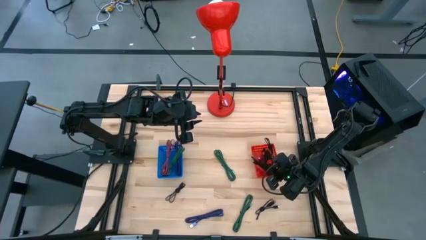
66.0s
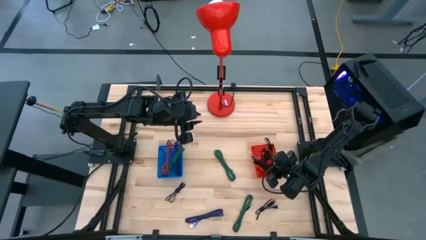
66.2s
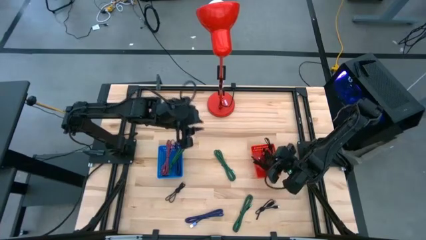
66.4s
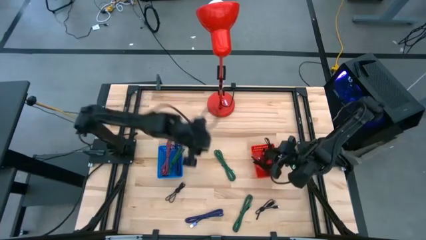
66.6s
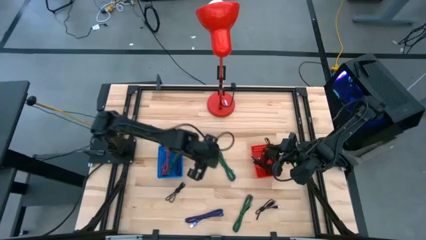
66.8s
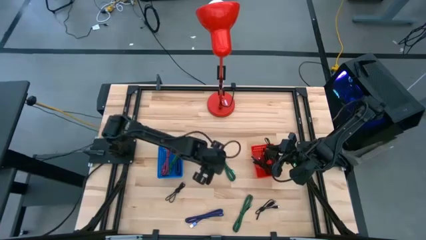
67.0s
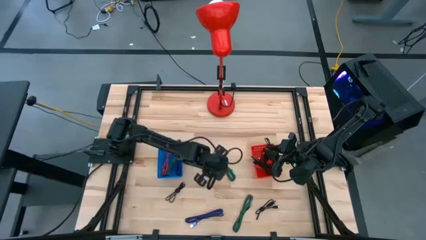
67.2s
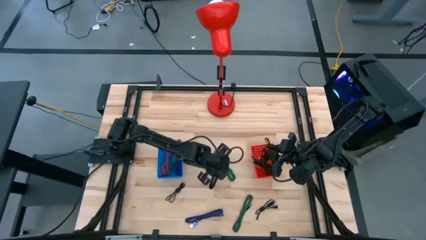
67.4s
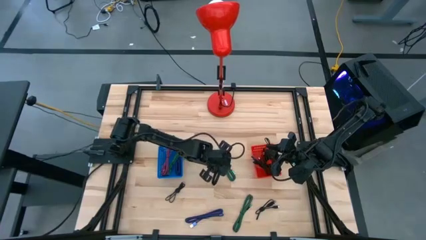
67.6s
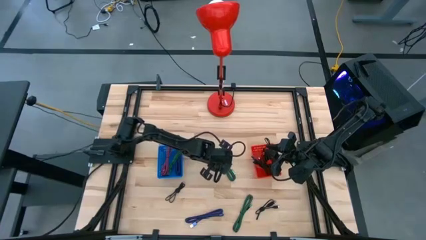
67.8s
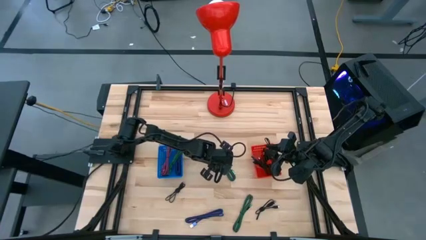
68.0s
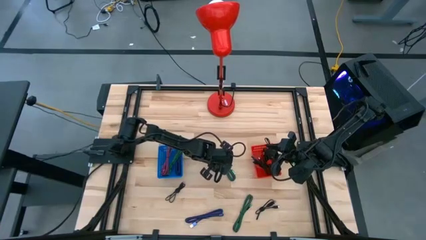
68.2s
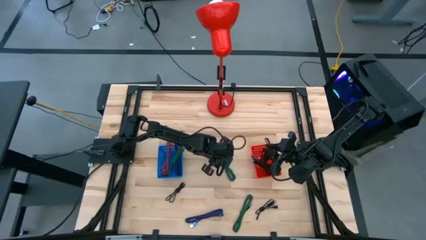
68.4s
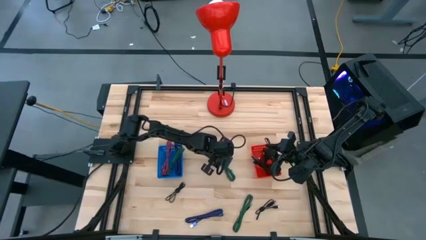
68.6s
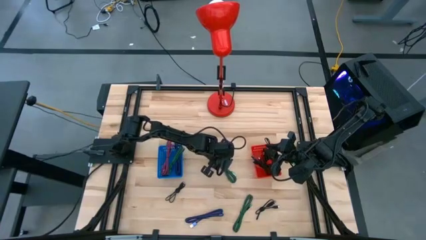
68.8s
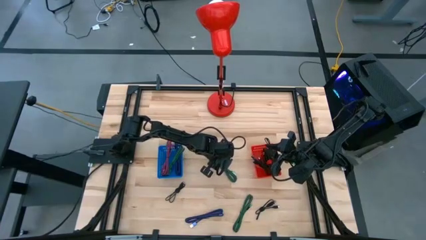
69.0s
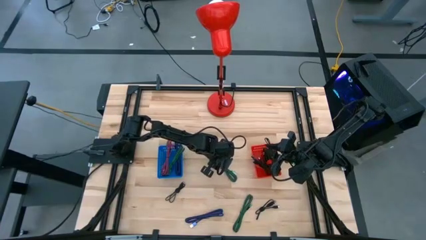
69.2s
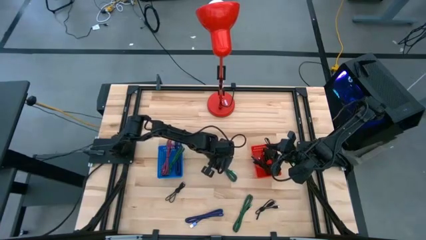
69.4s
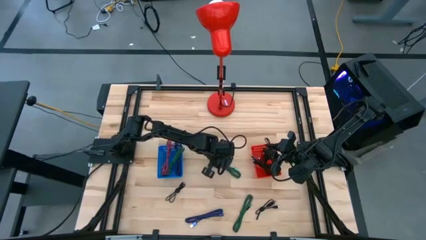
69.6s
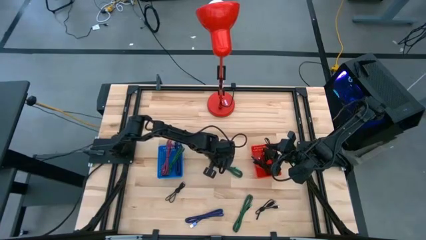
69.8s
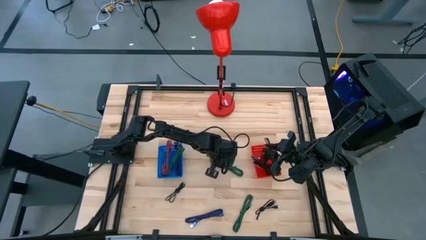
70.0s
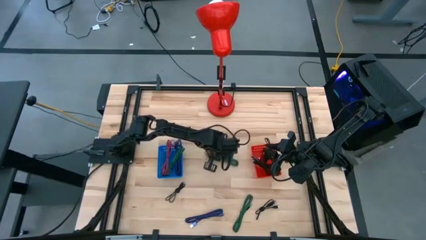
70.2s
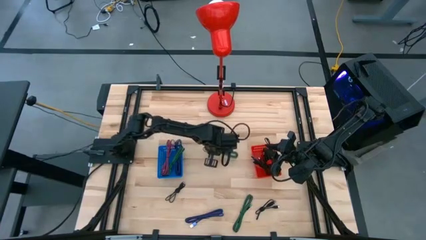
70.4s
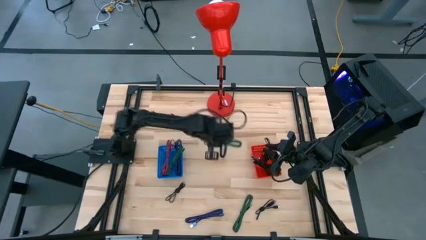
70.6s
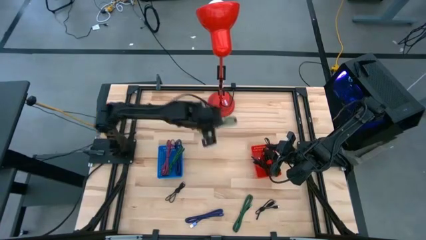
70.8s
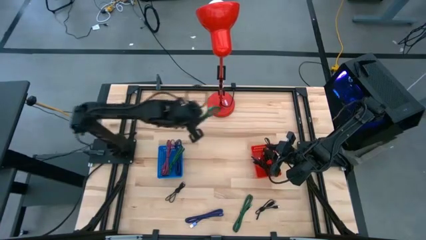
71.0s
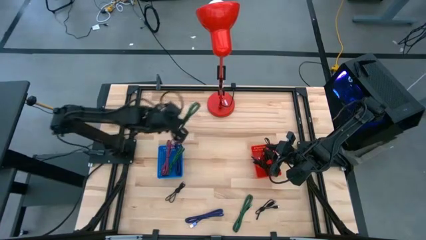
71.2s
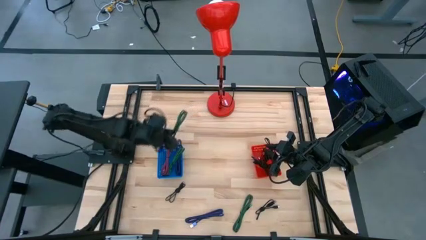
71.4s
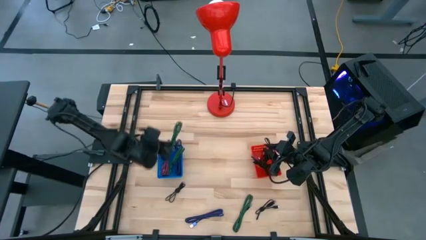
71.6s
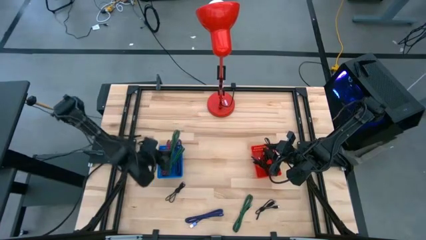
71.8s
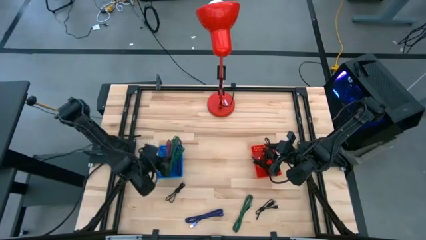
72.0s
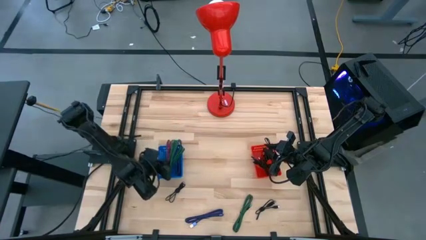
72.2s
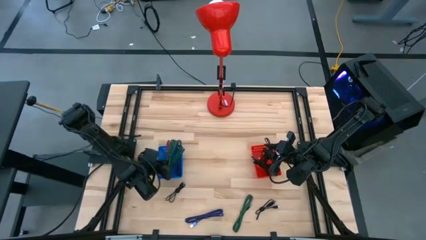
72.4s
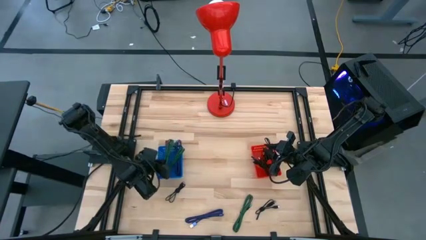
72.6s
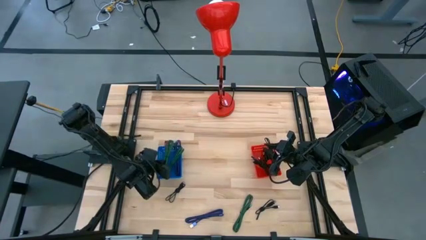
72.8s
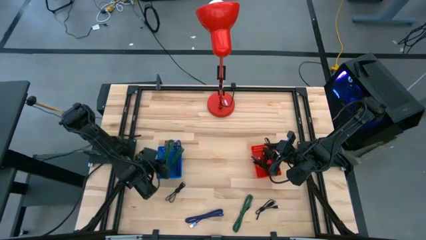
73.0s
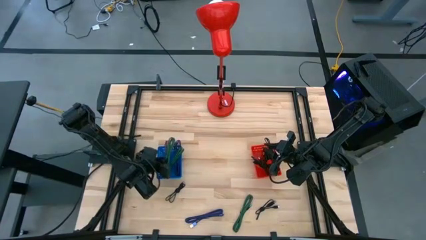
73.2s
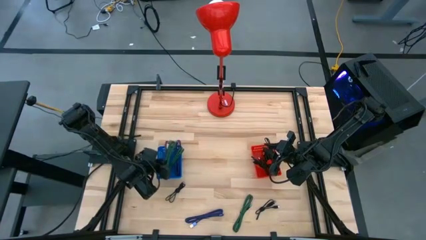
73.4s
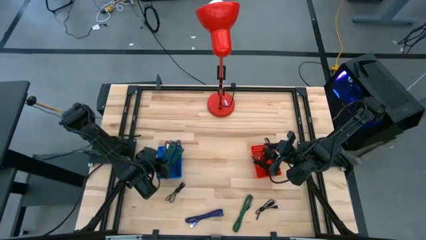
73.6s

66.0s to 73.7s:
Task: Pick & Place USB Port
Put the green and black charger cable into the blue bin

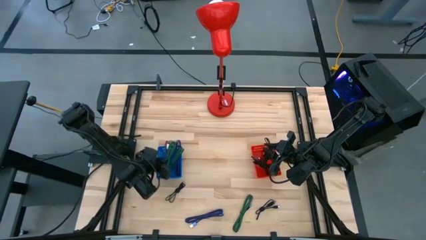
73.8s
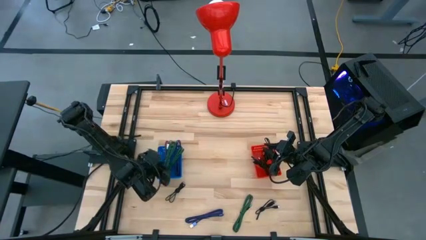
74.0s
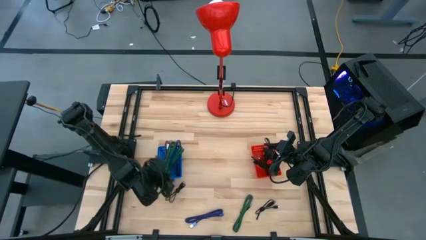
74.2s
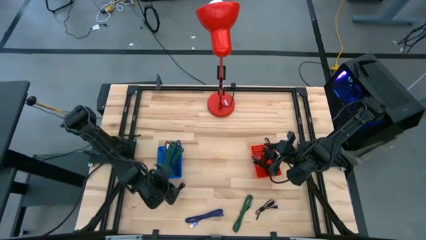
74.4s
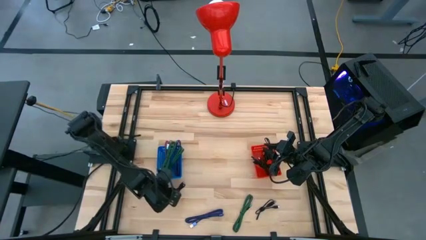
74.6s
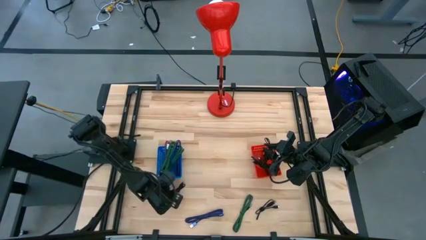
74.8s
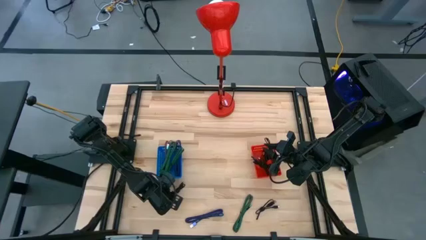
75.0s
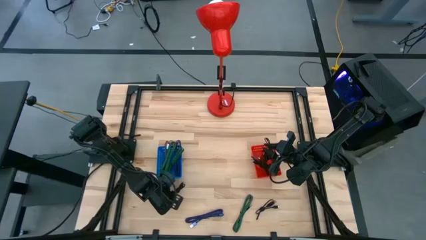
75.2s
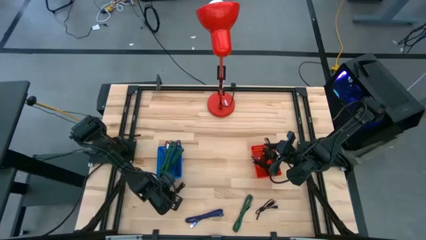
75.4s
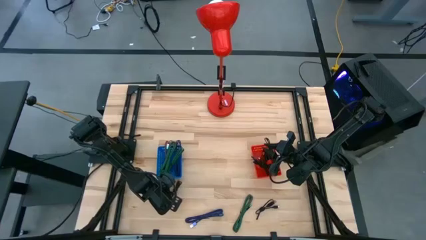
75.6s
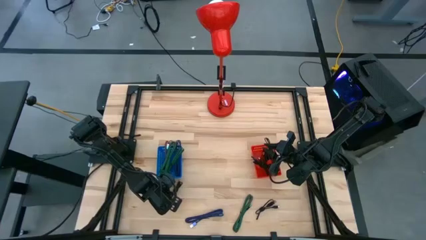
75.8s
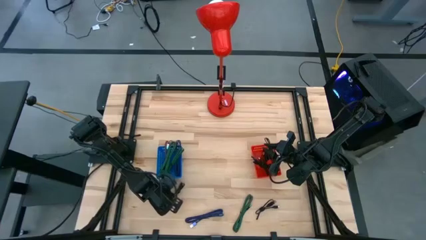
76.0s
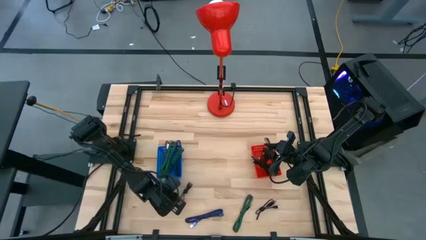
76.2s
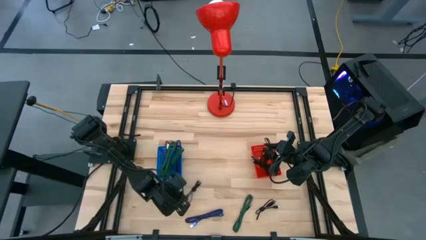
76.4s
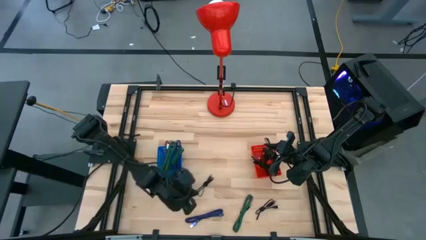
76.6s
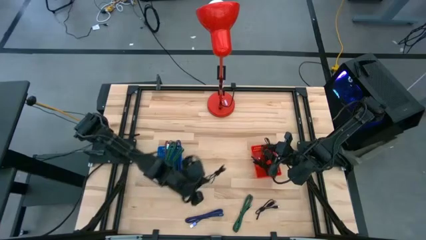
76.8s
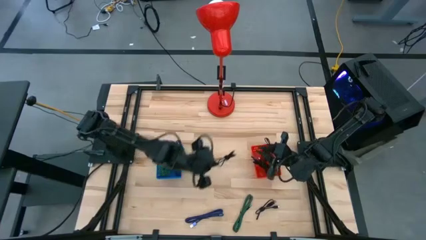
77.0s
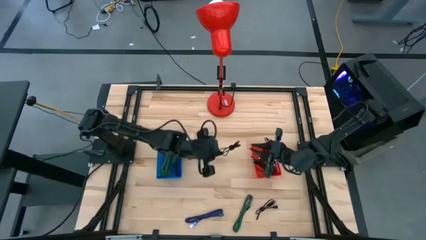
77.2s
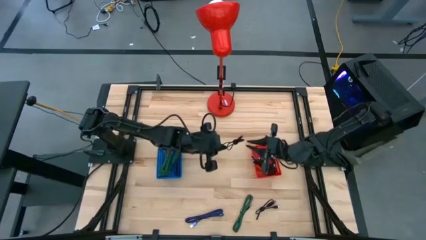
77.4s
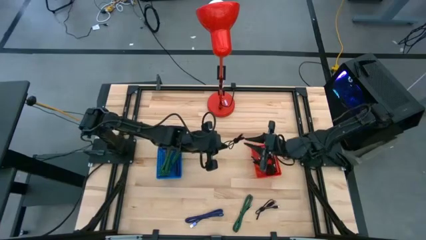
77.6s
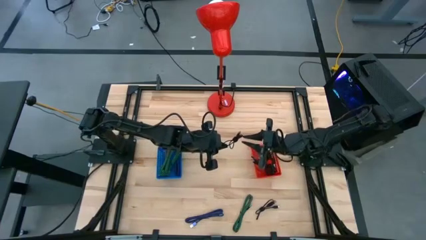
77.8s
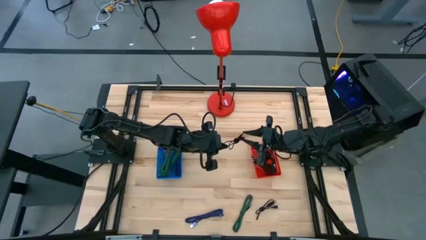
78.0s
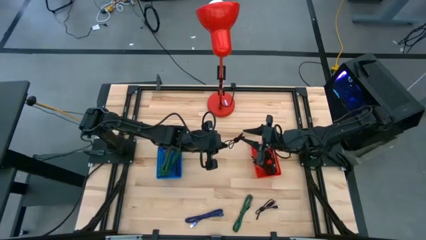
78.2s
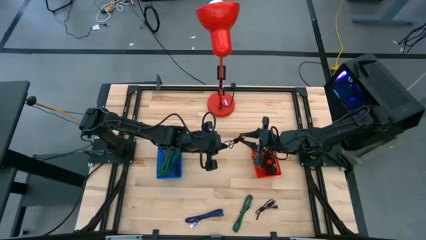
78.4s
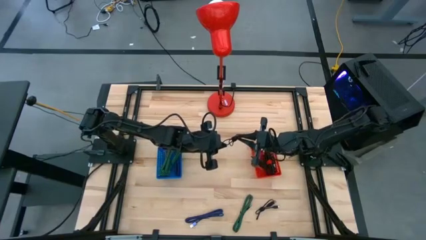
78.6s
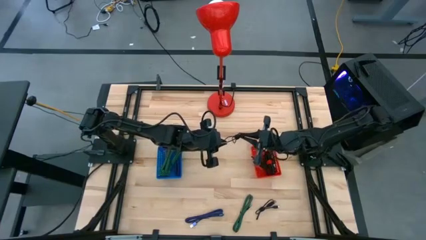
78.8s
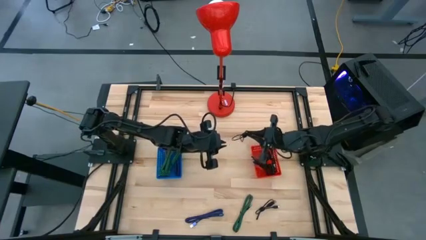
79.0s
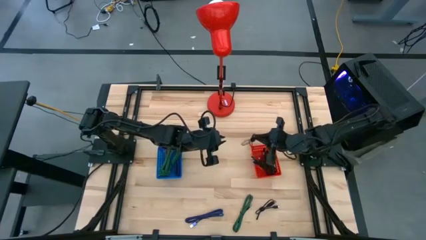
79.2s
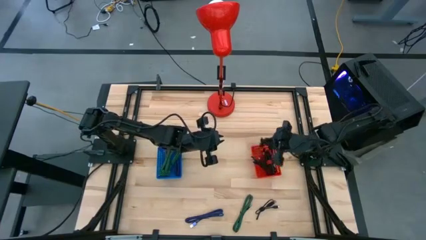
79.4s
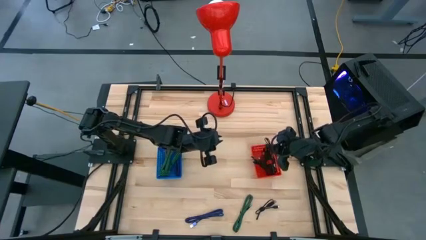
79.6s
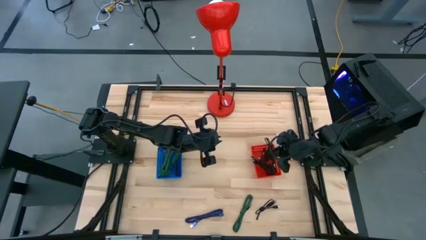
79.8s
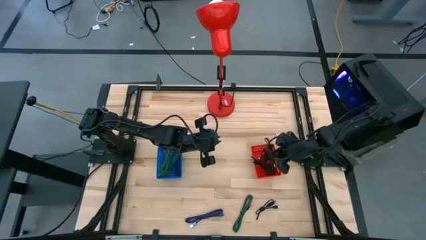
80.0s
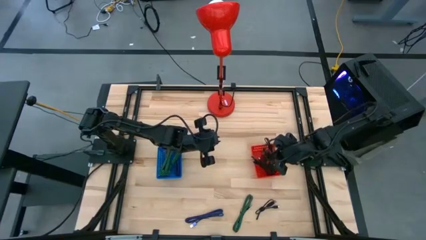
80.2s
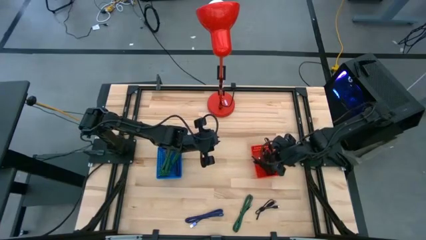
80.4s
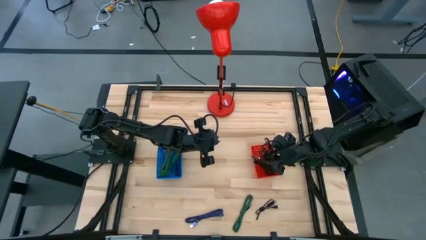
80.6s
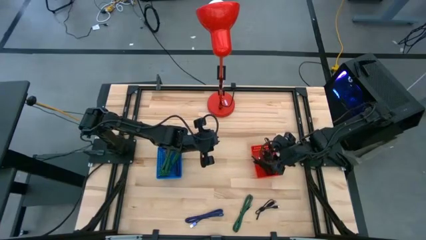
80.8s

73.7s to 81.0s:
Put the black charger cable into the red bin
